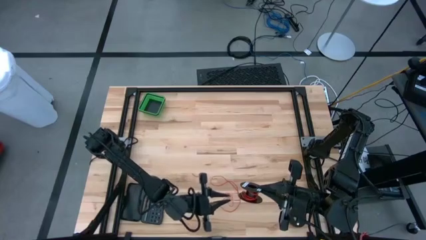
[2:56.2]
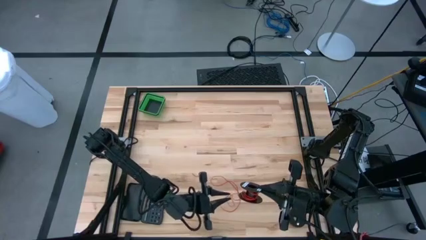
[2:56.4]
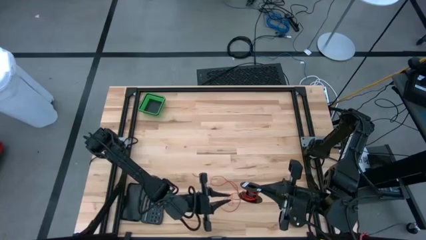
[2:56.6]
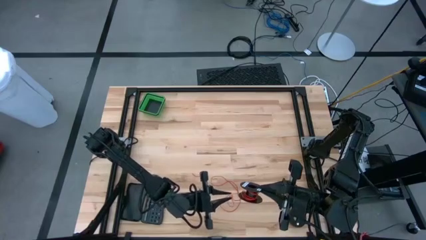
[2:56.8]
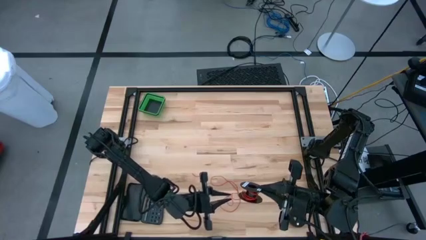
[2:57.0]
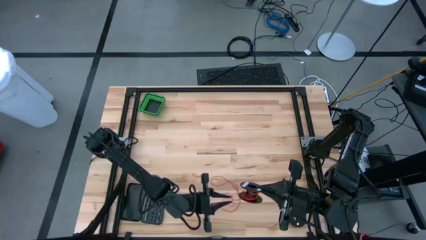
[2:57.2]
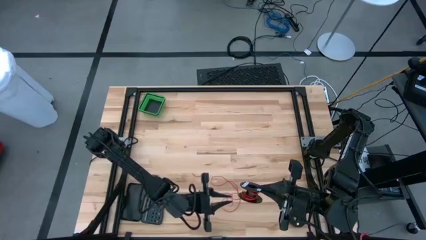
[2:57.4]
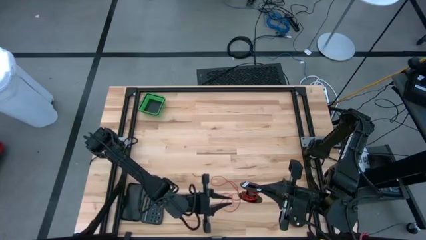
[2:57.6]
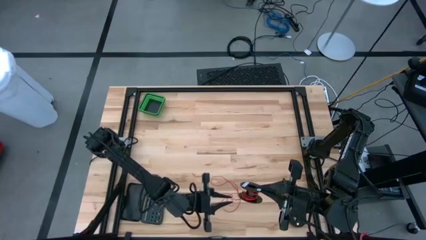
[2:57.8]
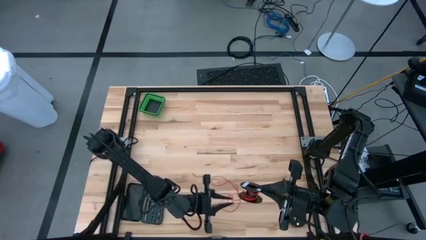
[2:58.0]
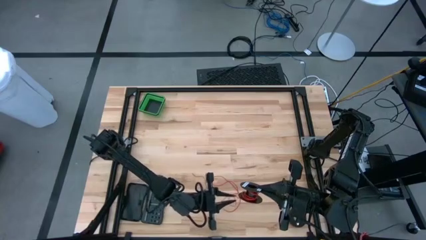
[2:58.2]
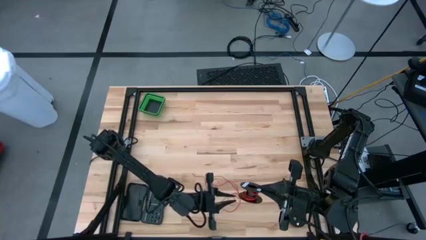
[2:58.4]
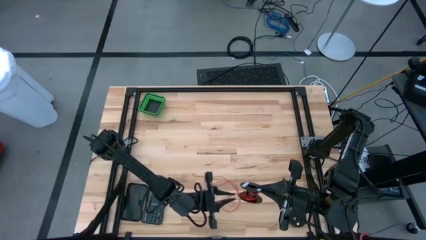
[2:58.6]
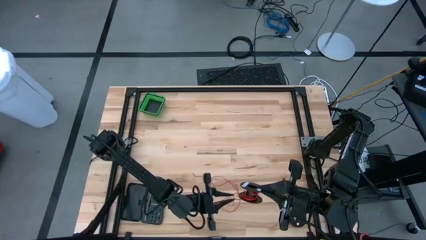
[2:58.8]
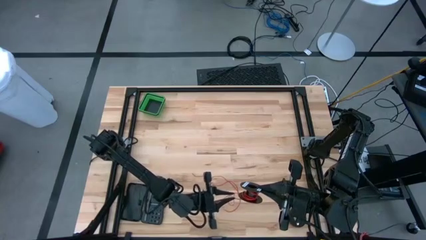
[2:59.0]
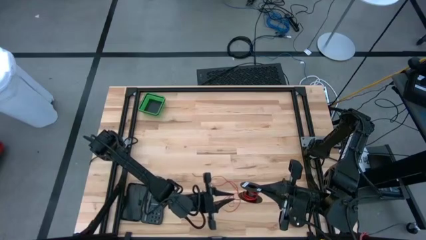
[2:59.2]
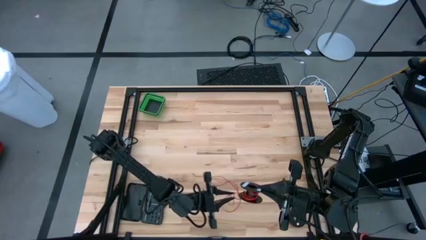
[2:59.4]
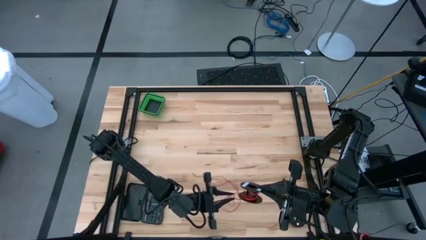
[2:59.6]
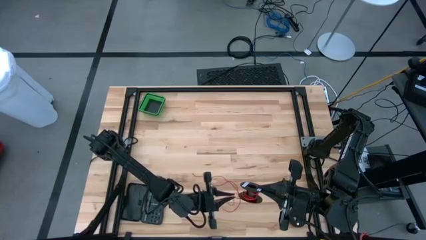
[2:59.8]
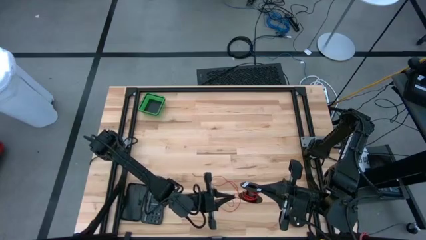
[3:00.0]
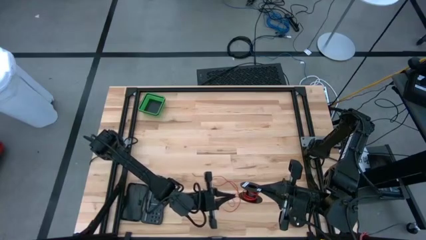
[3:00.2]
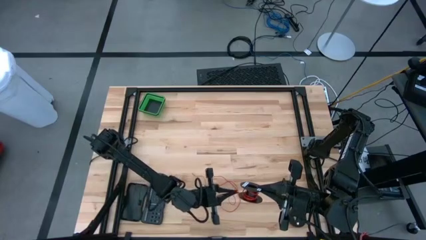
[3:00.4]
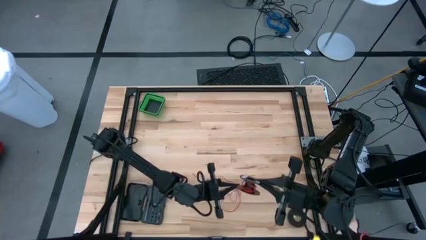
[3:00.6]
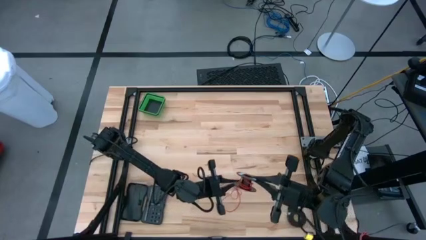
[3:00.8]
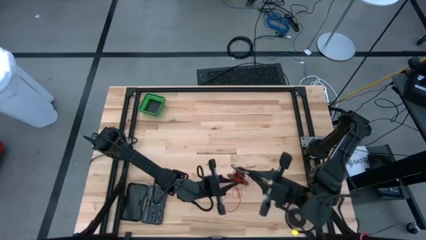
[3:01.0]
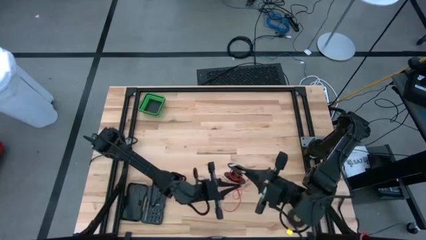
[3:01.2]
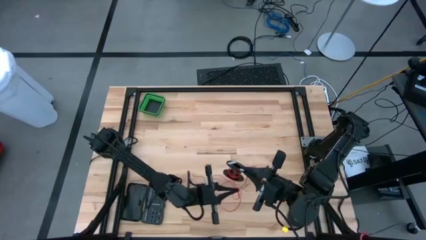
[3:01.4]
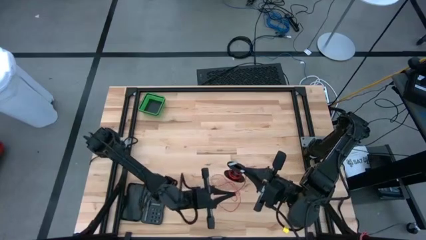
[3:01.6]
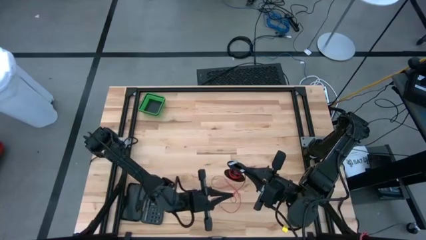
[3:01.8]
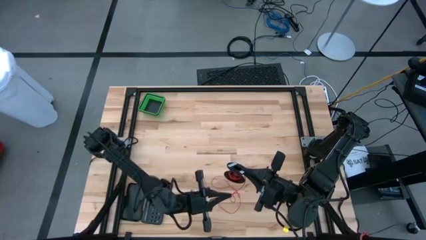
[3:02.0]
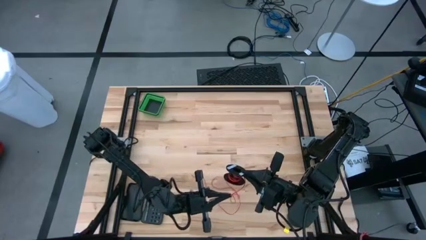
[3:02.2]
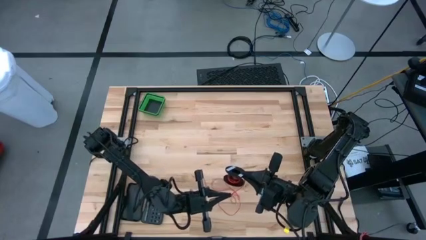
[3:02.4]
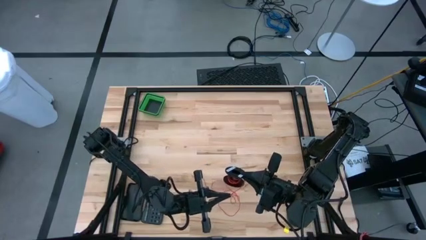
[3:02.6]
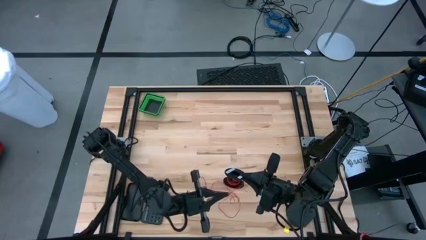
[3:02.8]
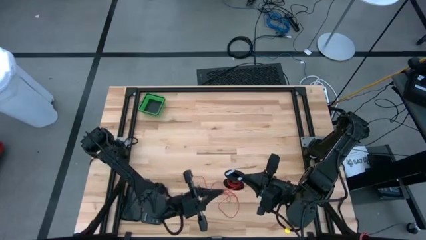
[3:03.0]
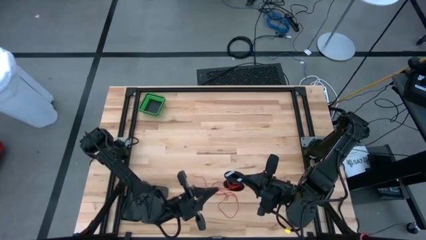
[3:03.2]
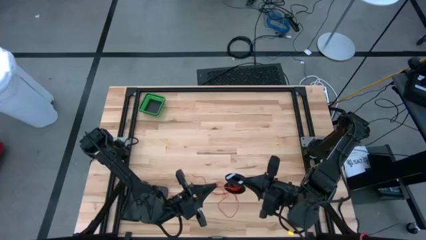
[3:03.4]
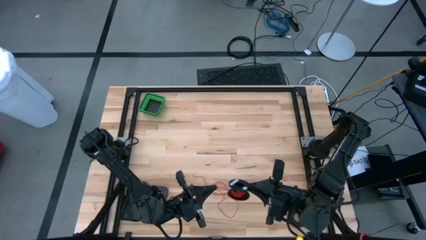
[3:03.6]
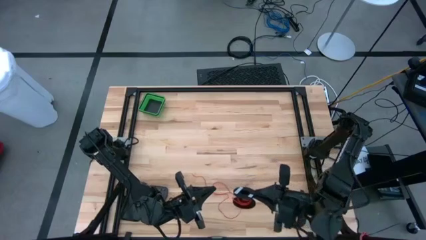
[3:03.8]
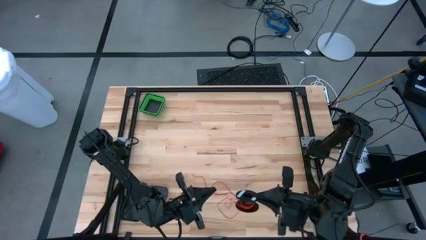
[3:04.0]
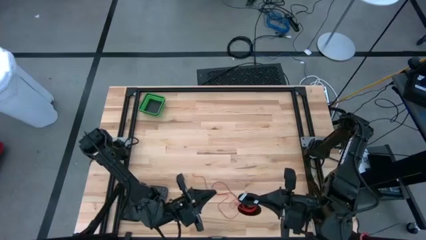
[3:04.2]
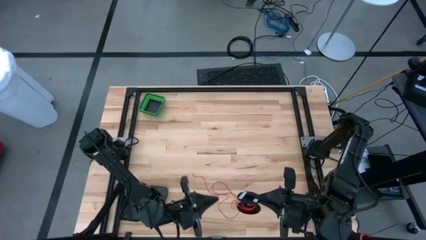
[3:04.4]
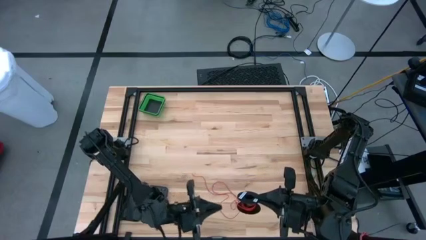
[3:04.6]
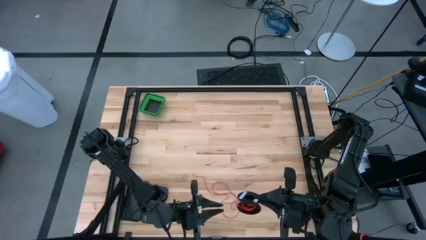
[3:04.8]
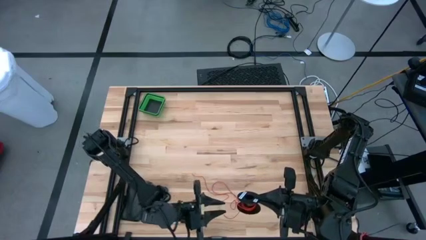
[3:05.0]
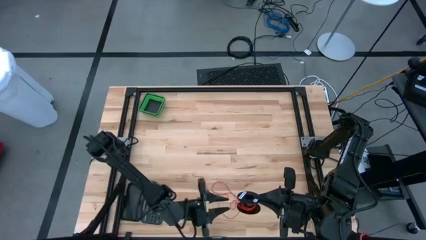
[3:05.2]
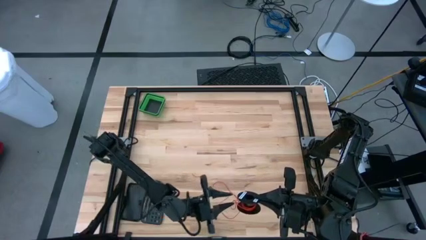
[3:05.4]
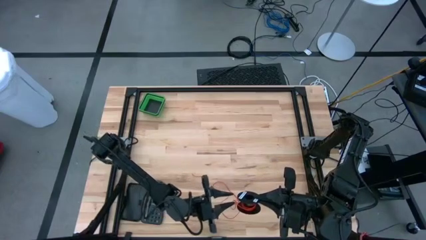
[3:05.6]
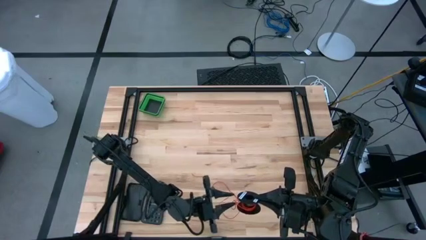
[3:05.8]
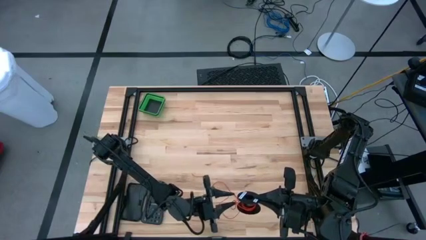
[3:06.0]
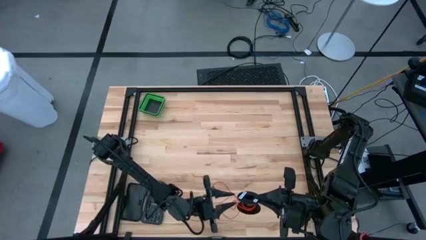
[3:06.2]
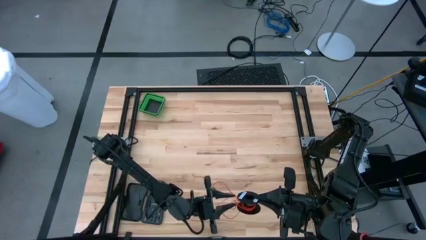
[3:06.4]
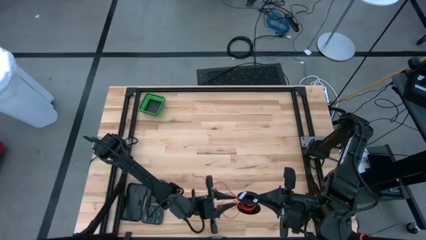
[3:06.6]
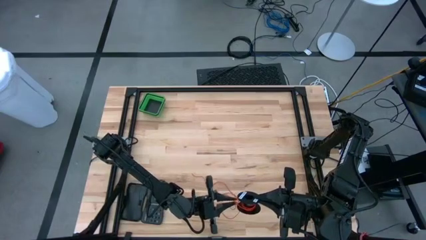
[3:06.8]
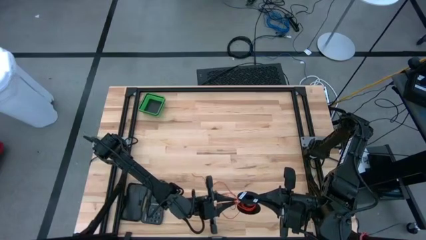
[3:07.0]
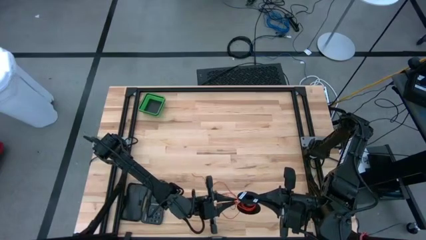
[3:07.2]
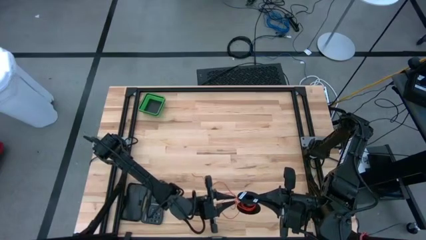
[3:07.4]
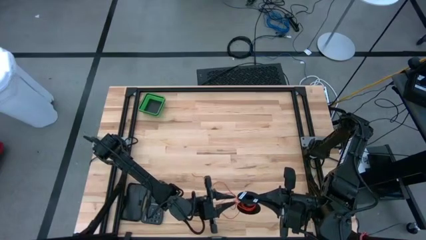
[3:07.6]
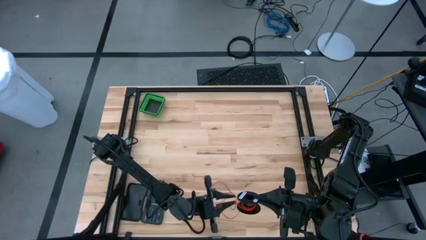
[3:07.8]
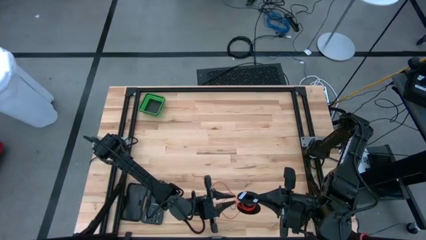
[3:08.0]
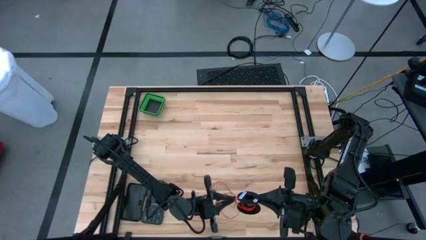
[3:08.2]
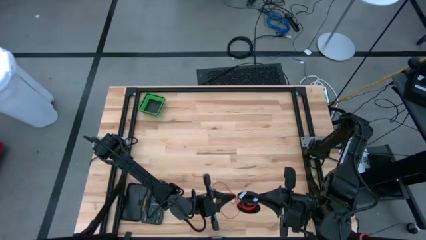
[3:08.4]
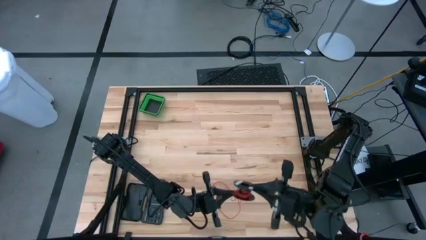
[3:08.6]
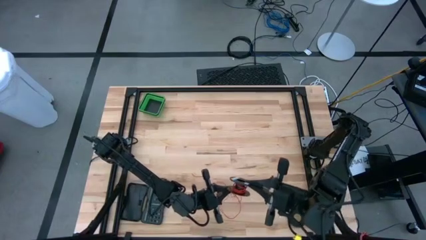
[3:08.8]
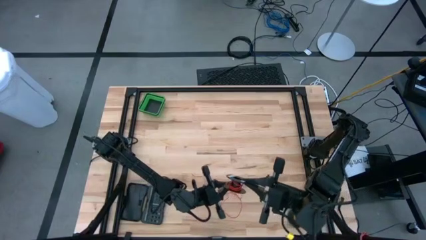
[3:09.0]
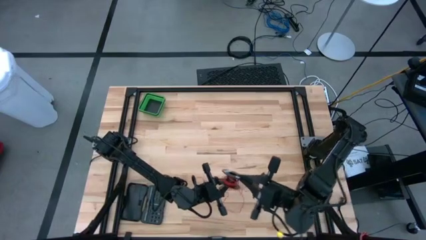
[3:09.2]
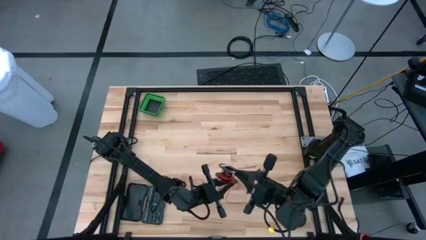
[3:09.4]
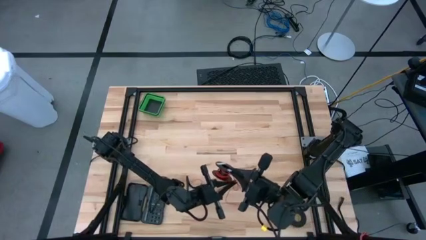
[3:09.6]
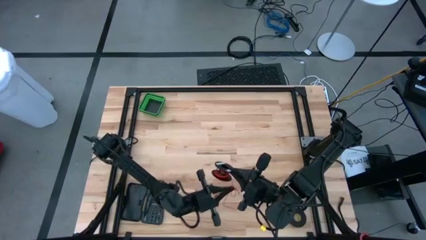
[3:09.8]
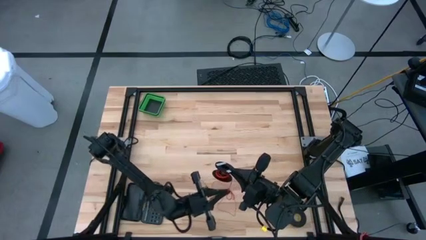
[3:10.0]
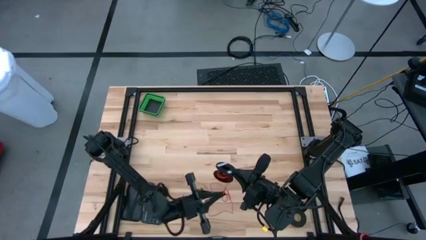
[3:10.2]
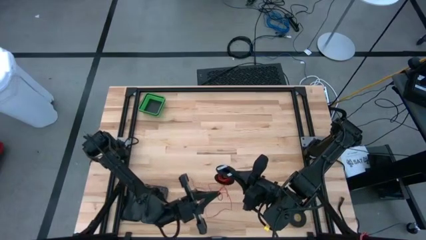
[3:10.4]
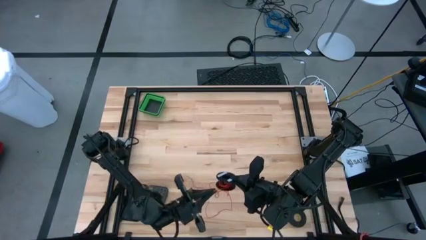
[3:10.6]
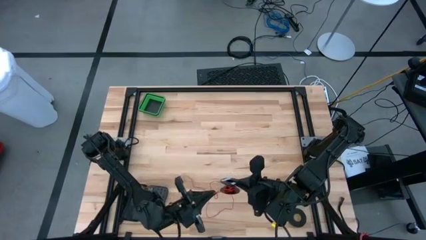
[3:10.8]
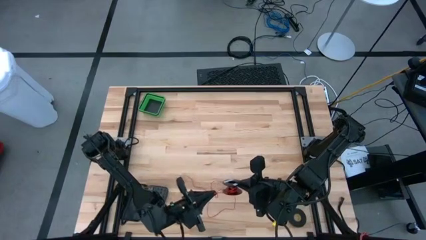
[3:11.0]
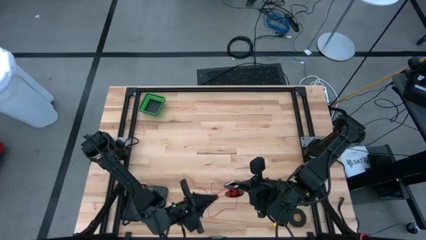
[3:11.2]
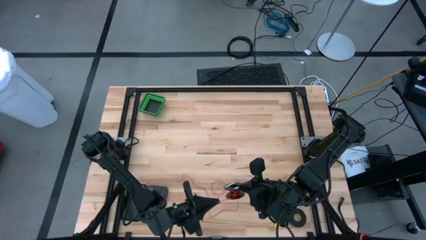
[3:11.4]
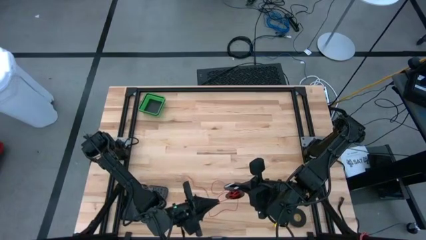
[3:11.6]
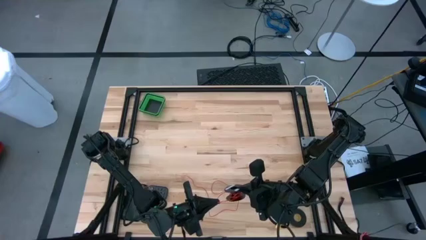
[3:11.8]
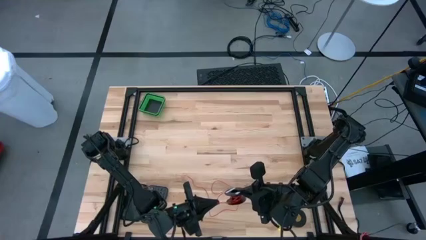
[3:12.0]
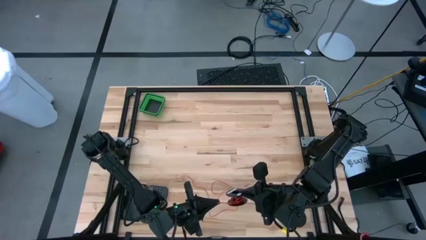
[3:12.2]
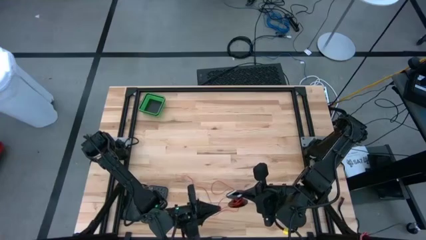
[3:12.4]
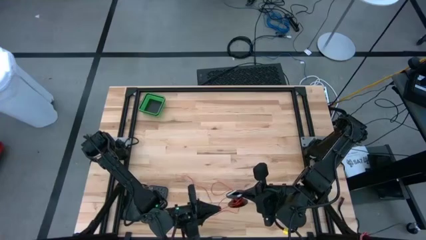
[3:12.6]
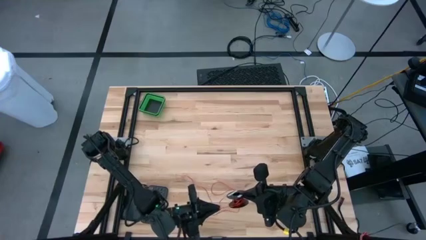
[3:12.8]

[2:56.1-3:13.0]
Task: Coil cords
Coil the red wire into the spool
